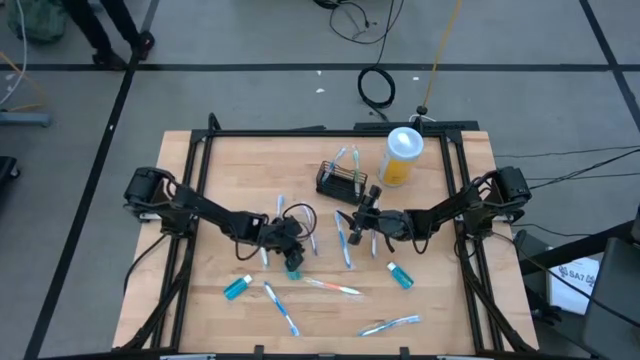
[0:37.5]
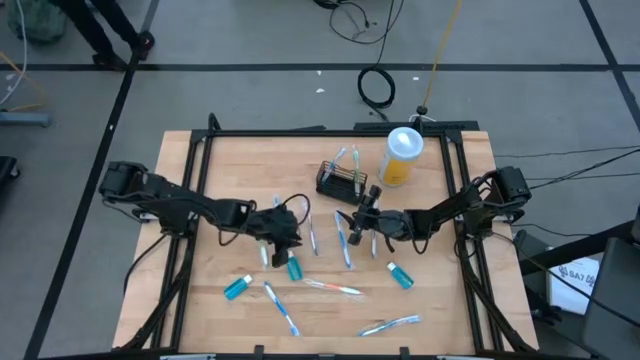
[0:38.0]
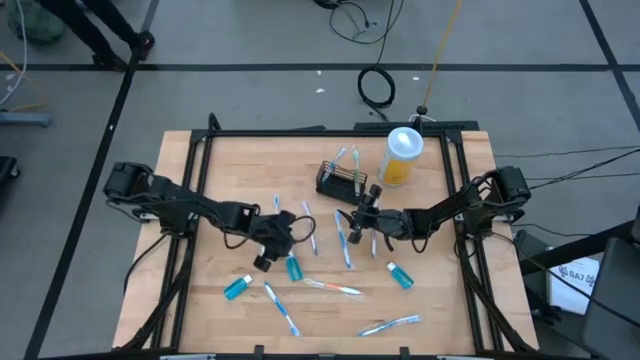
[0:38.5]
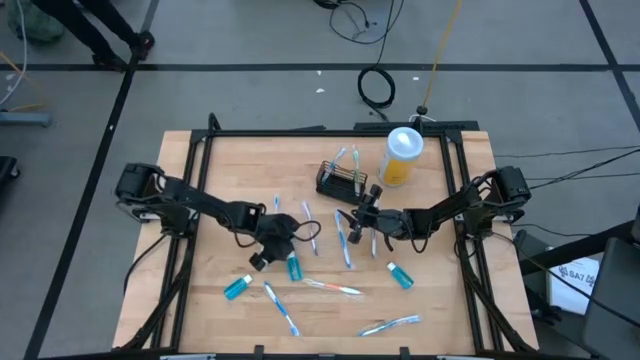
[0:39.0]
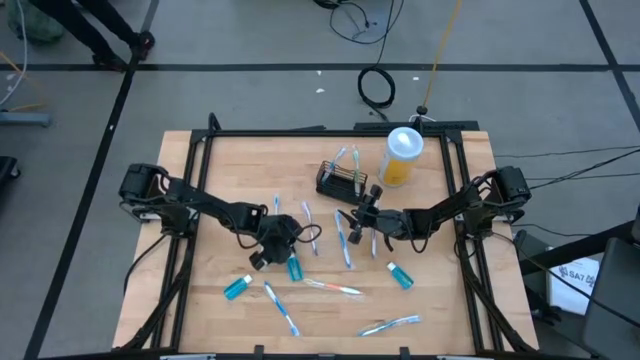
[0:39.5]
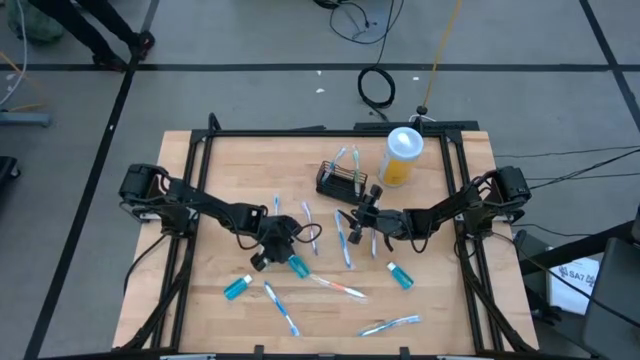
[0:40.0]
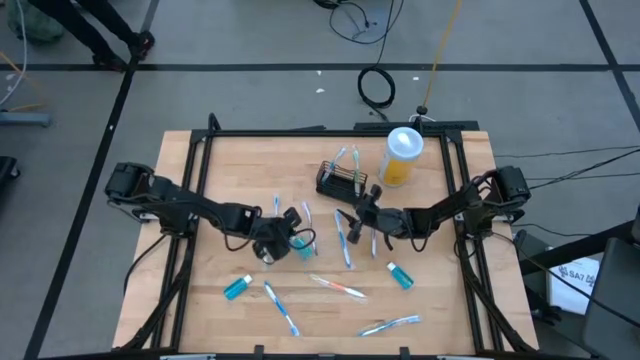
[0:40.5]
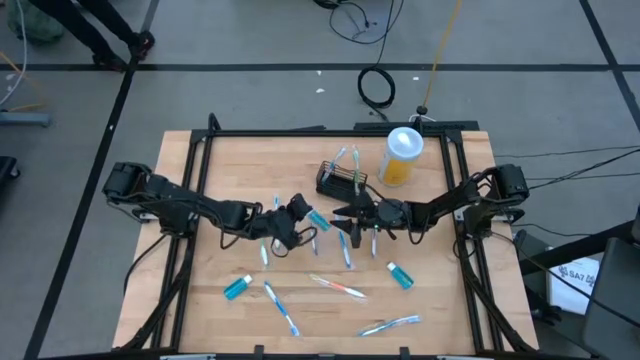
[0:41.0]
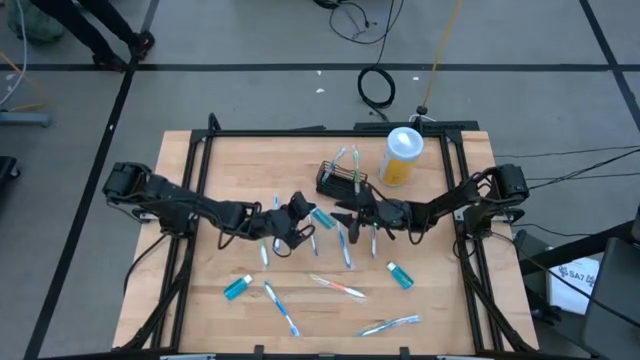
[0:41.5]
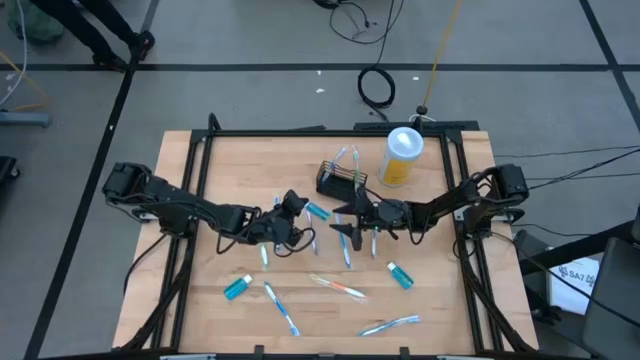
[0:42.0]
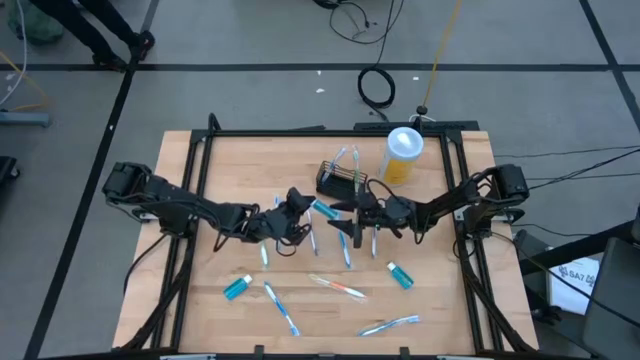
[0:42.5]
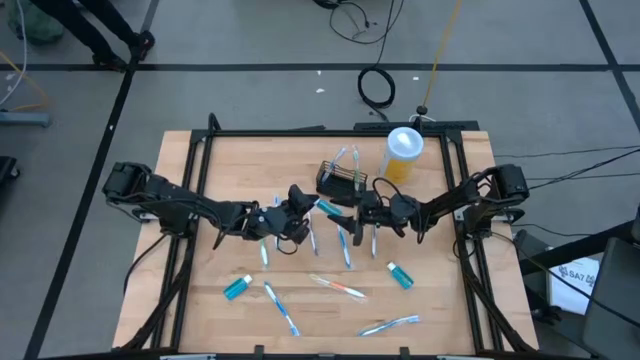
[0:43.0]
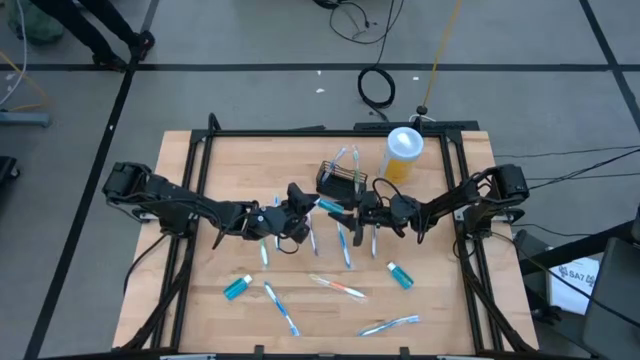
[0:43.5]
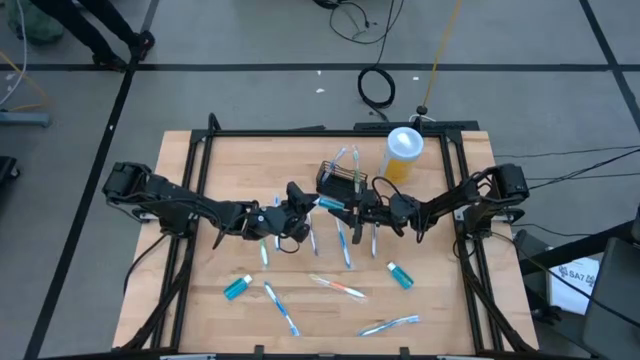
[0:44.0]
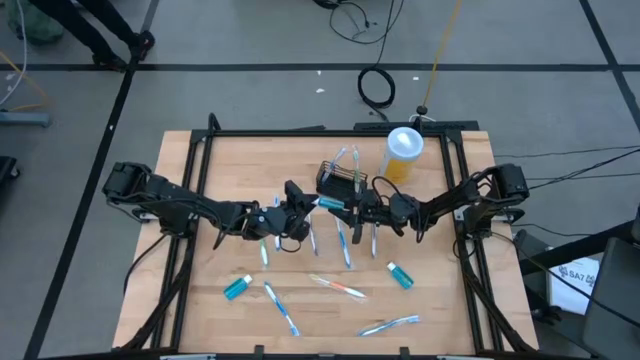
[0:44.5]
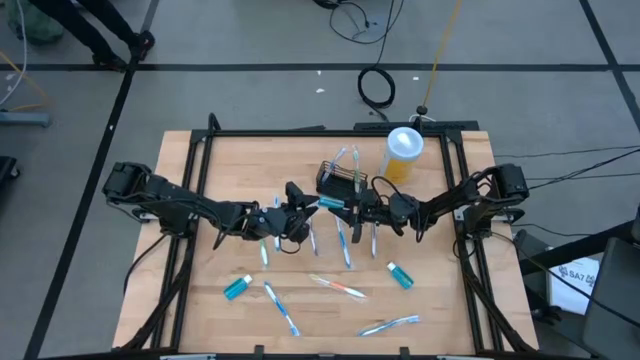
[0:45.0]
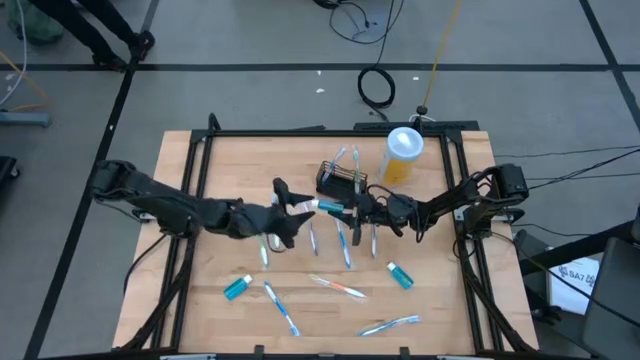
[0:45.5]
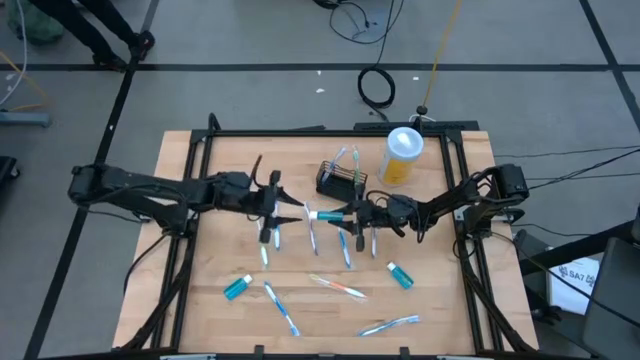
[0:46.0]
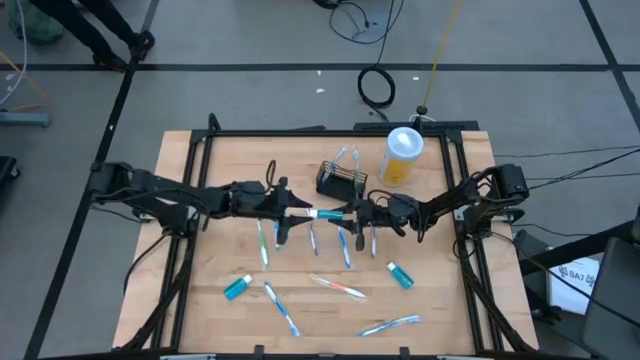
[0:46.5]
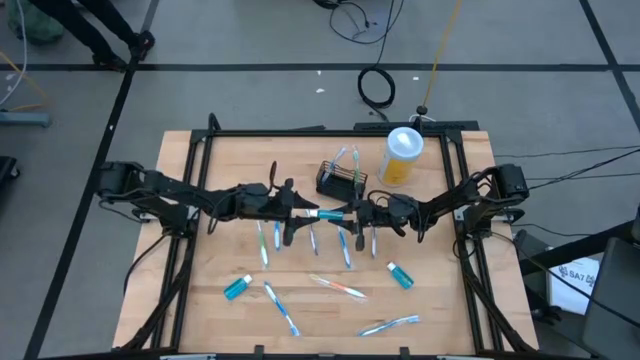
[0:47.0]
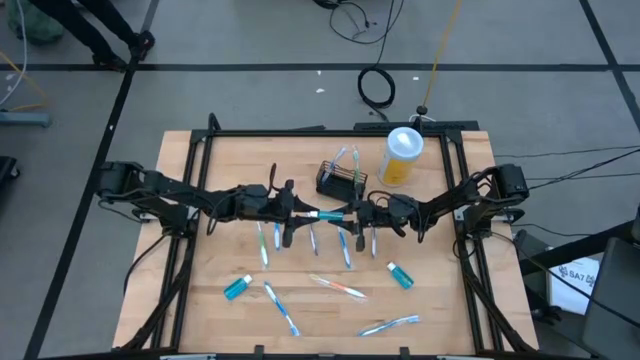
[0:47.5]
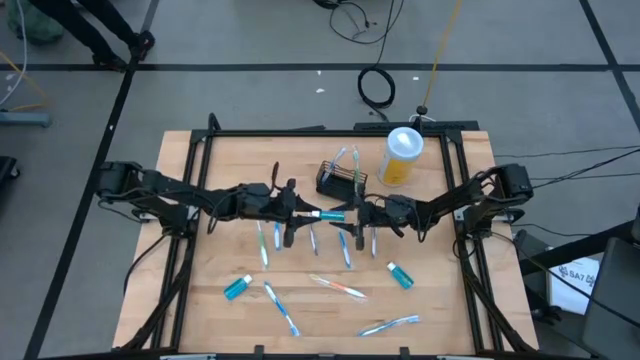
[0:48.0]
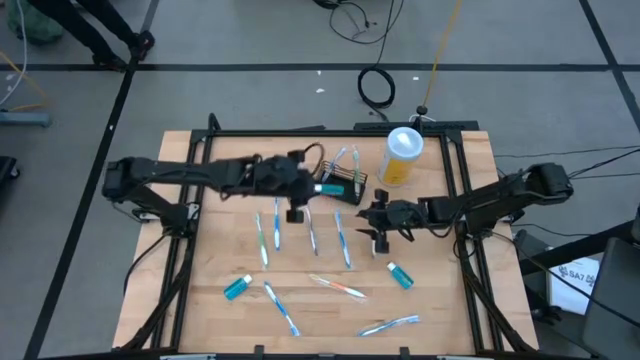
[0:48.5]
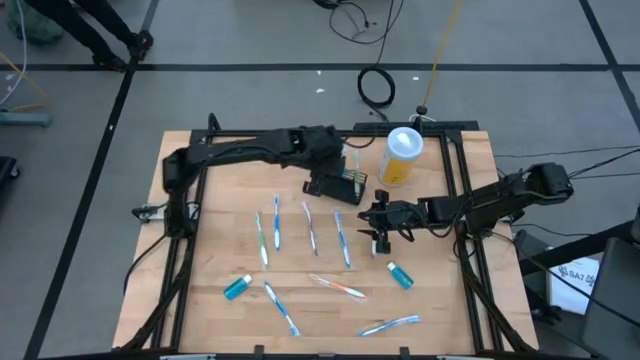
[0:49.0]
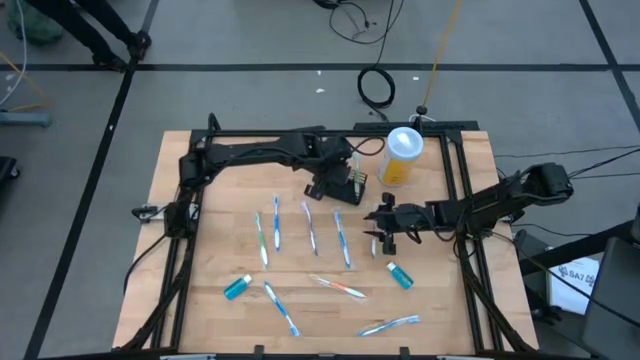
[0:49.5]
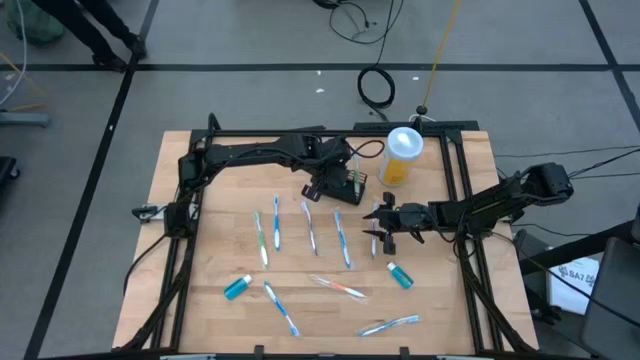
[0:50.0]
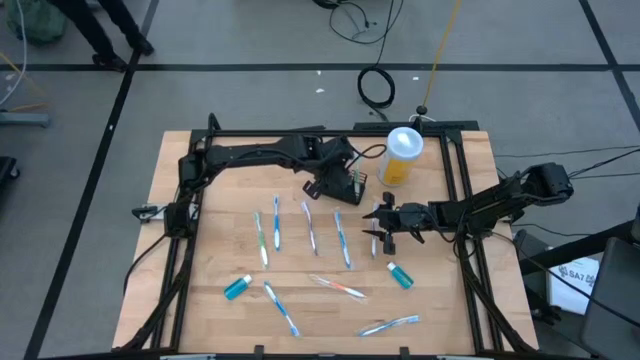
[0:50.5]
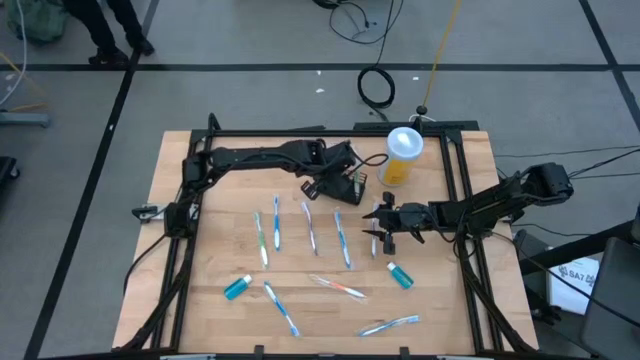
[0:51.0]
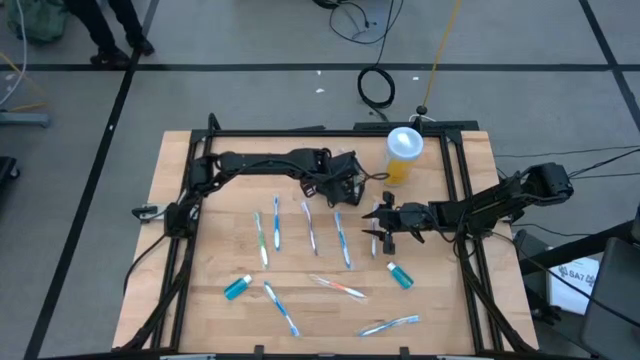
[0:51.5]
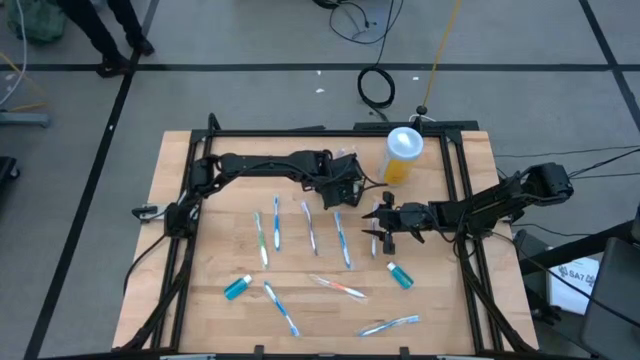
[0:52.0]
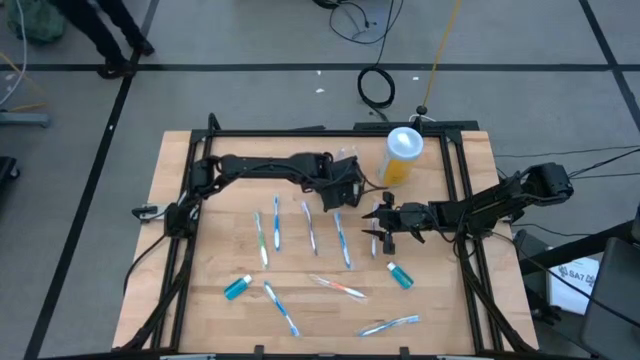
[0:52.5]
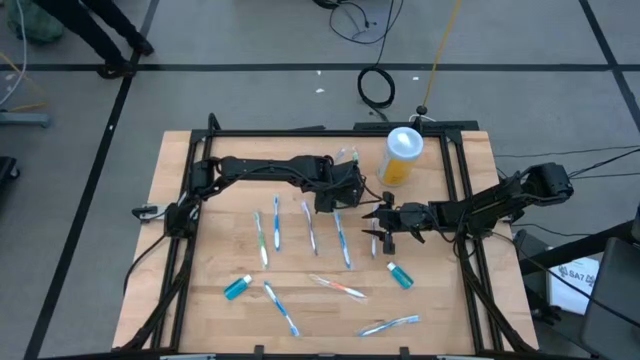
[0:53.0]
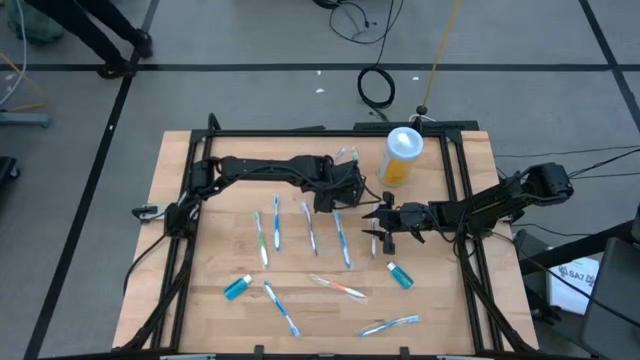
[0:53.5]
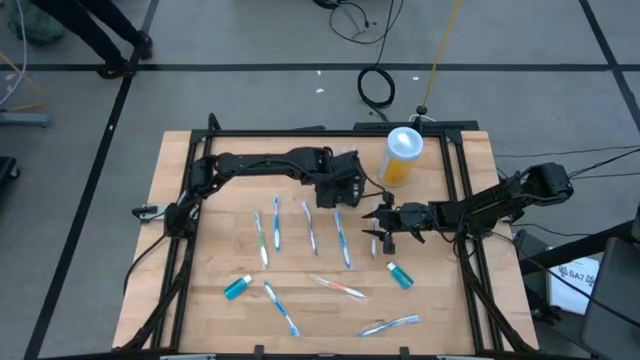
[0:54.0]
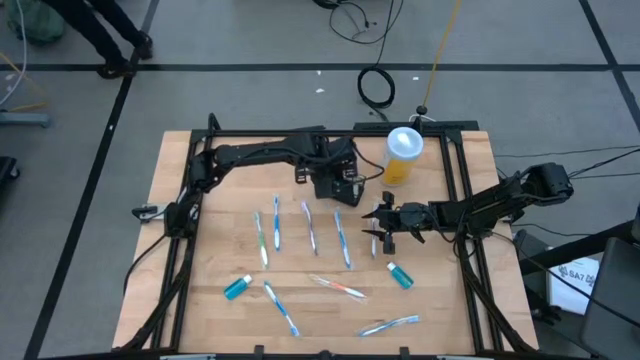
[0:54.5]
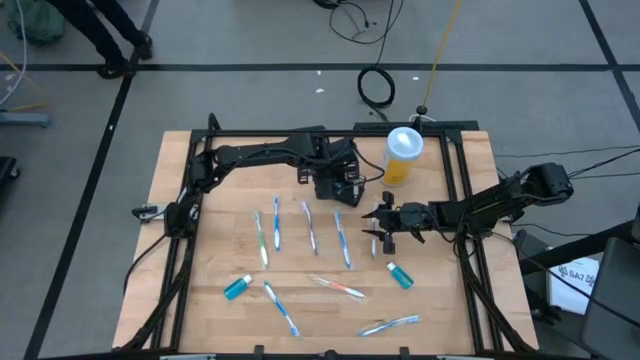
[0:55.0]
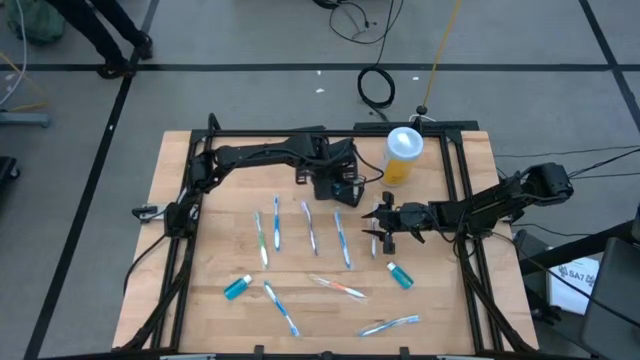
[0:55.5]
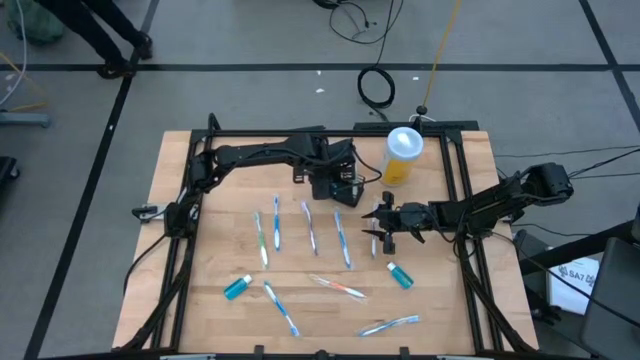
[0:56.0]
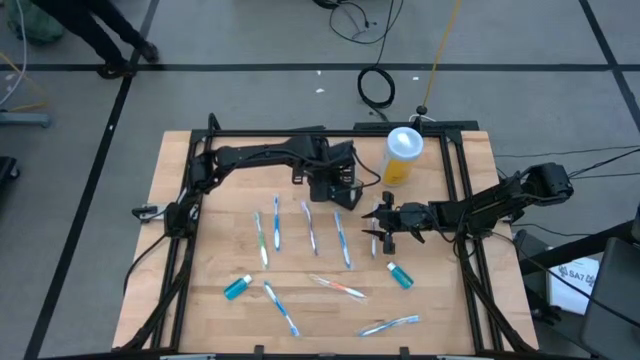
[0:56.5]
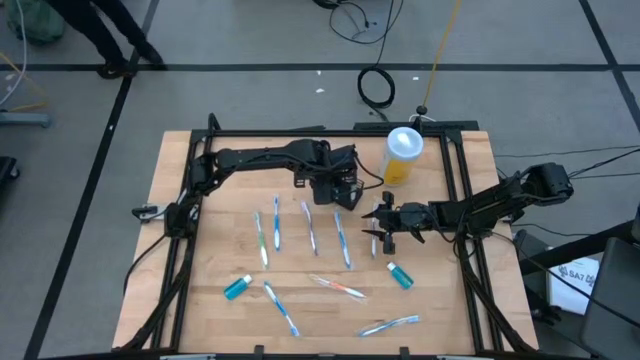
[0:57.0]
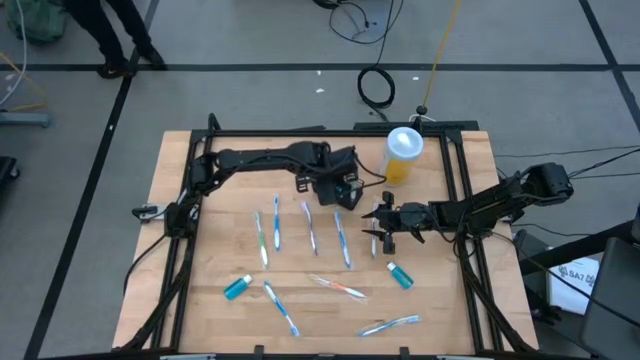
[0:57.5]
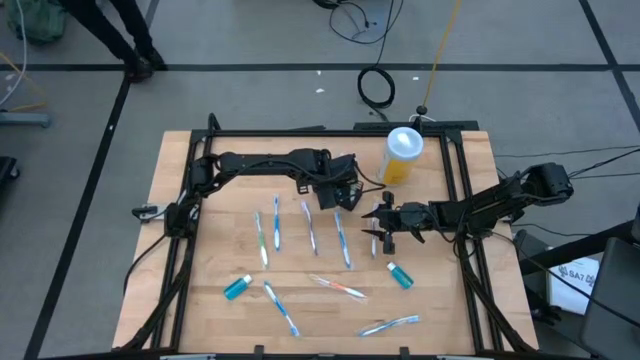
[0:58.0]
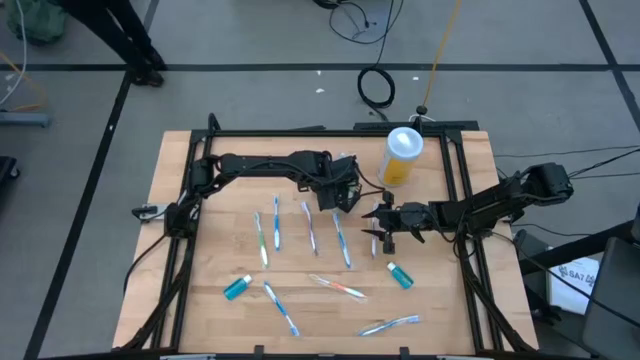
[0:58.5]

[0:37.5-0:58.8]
Task: Pick & Place toothbrushing station
Put the blue mouthwash bottle into the black organizer

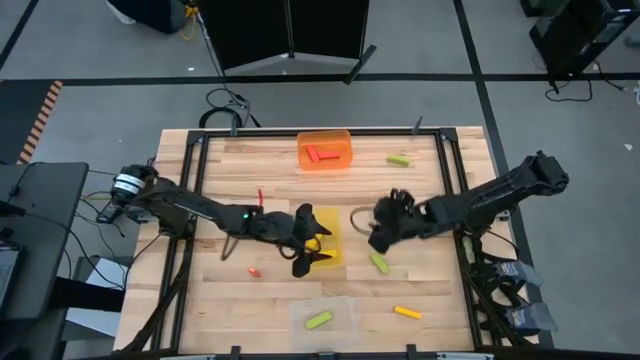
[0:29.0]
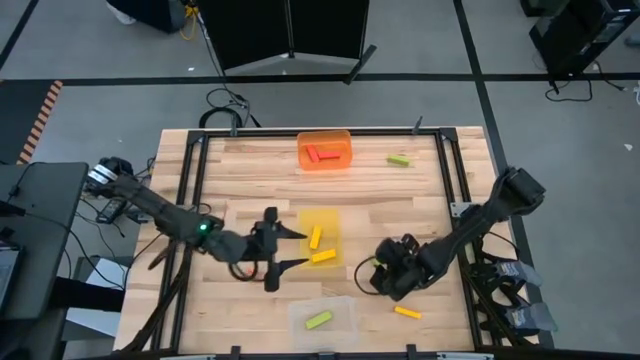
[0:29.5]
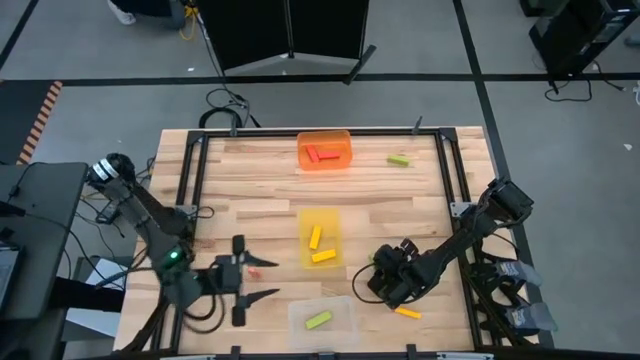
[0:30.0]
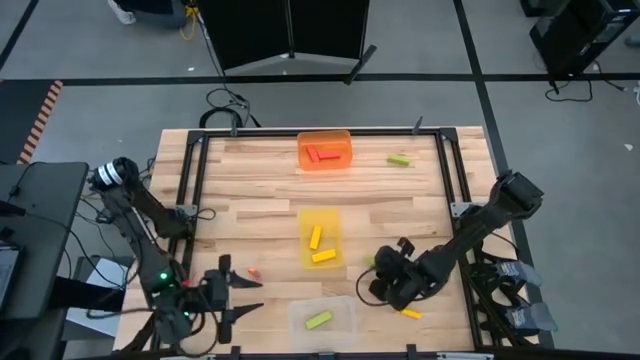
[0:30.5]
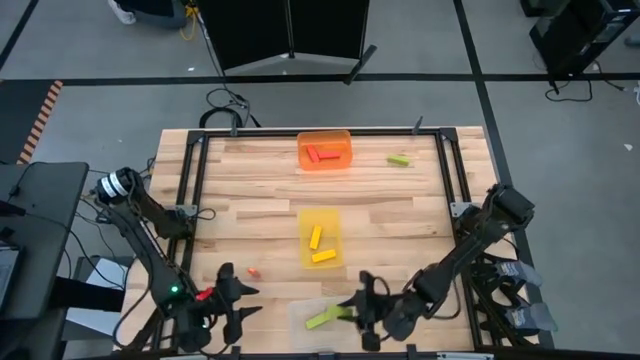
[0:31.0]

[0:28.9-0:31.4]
Task: Sort blocks
Put the bottom green block into the transparent bin
